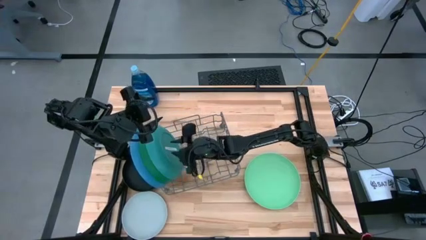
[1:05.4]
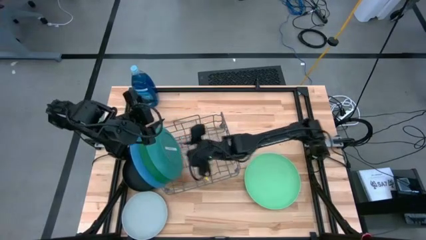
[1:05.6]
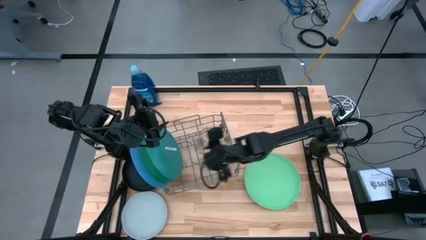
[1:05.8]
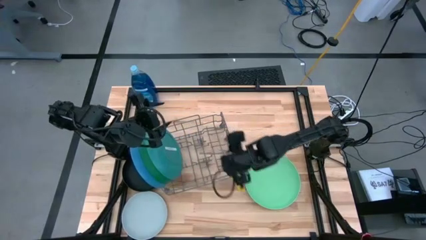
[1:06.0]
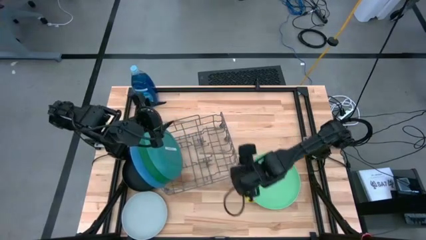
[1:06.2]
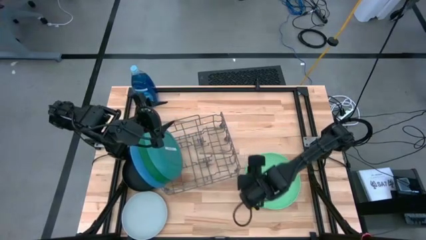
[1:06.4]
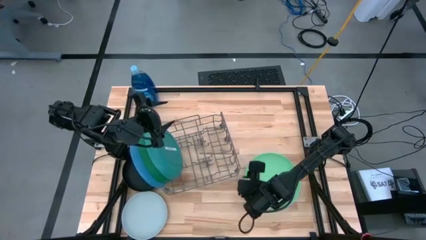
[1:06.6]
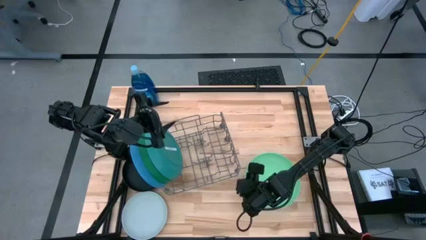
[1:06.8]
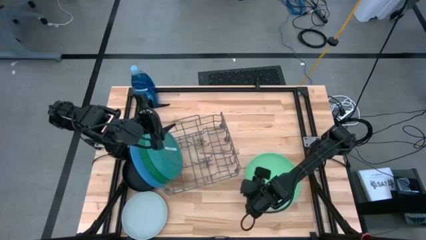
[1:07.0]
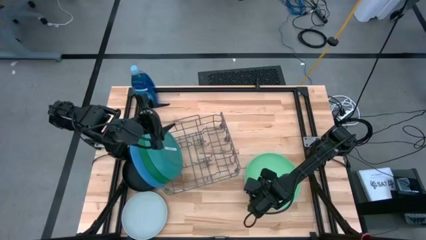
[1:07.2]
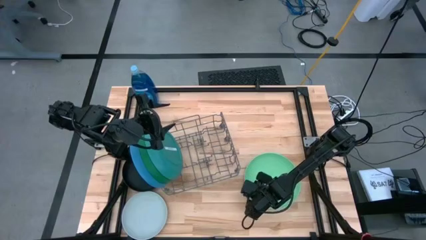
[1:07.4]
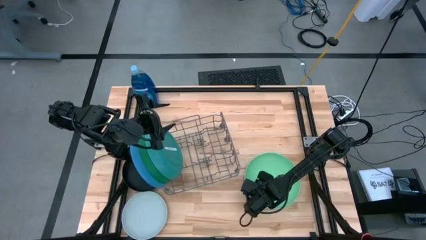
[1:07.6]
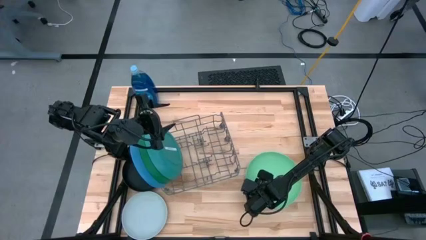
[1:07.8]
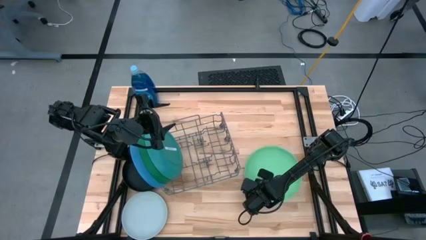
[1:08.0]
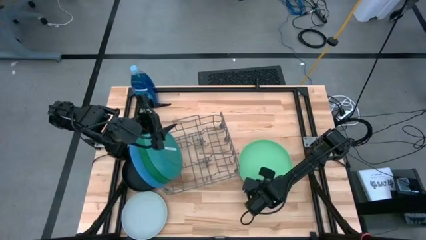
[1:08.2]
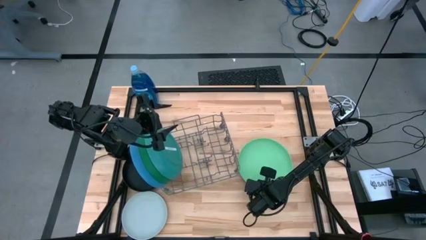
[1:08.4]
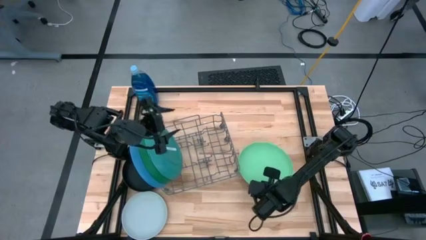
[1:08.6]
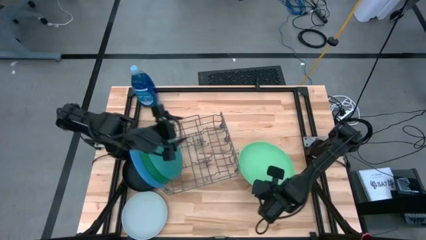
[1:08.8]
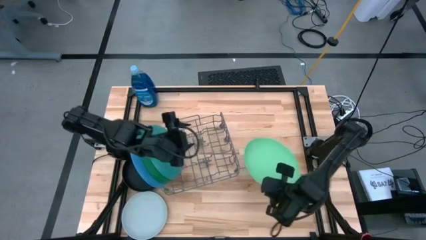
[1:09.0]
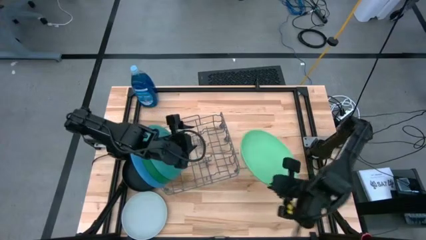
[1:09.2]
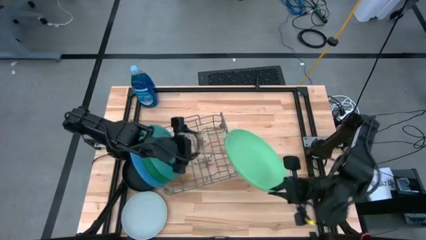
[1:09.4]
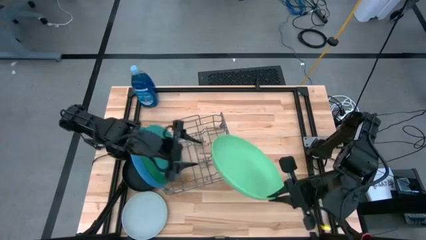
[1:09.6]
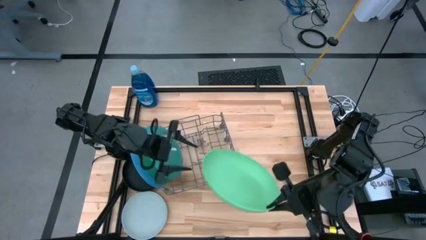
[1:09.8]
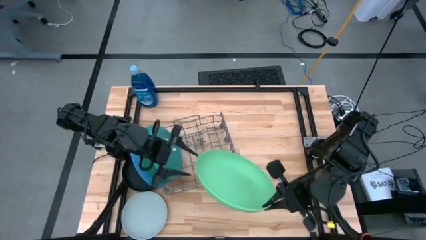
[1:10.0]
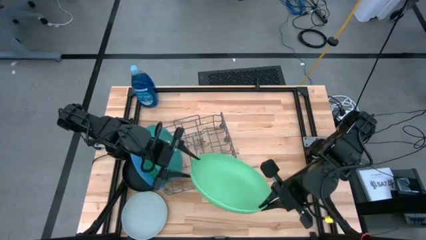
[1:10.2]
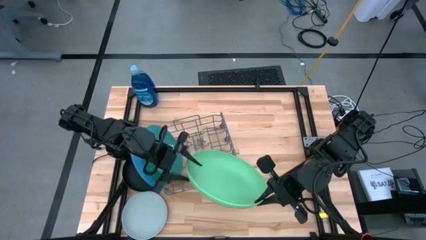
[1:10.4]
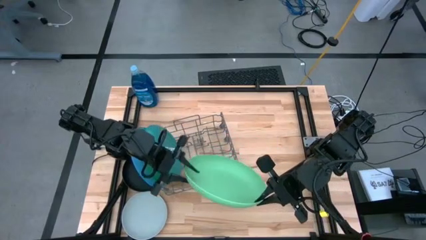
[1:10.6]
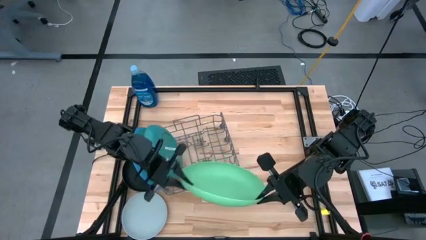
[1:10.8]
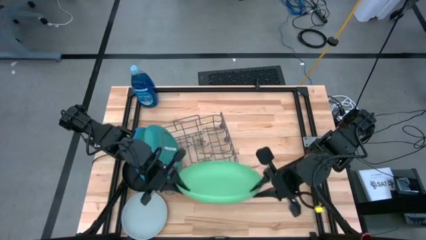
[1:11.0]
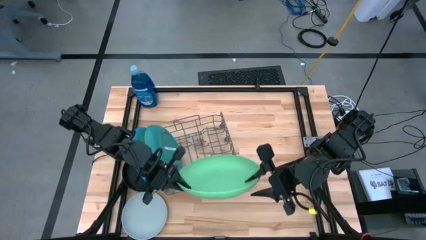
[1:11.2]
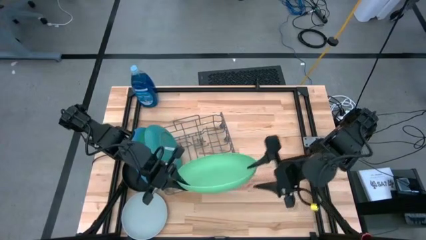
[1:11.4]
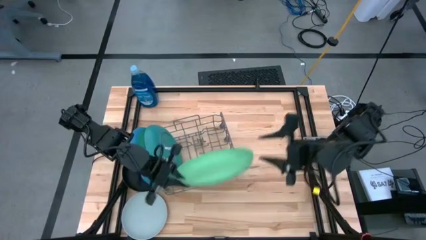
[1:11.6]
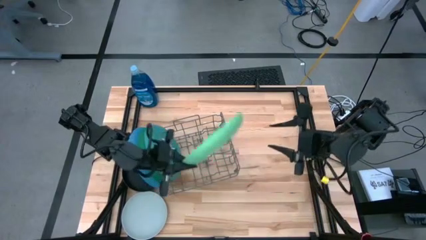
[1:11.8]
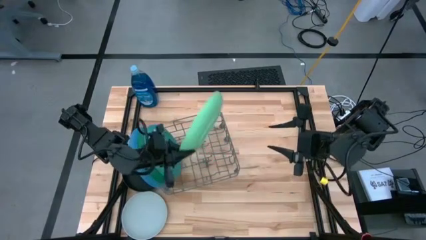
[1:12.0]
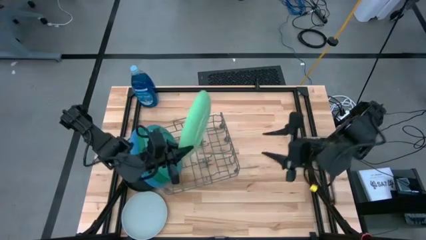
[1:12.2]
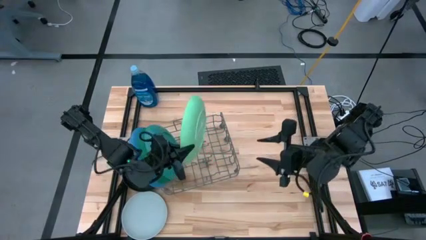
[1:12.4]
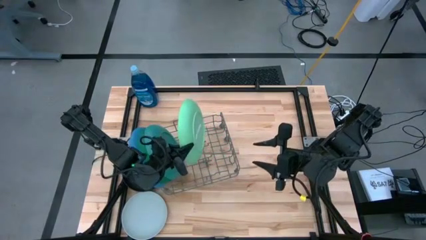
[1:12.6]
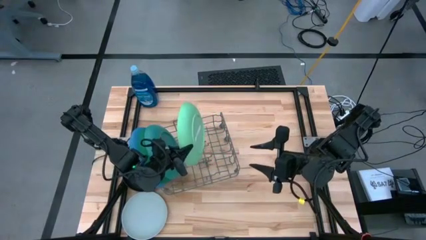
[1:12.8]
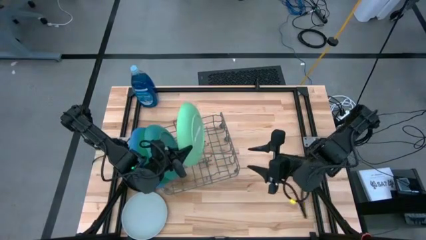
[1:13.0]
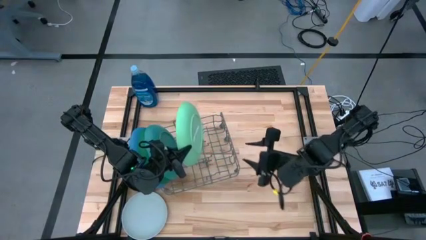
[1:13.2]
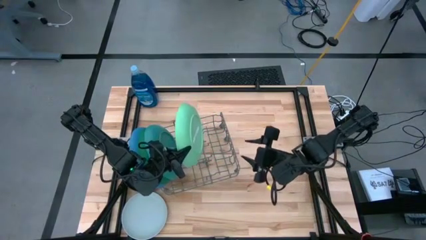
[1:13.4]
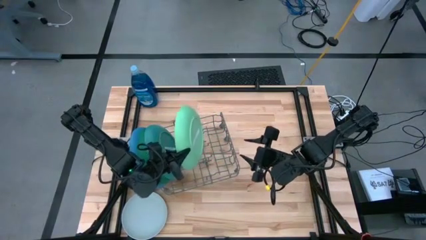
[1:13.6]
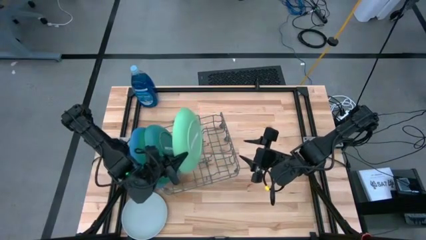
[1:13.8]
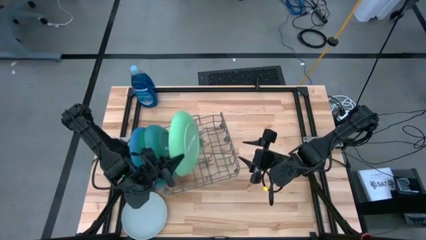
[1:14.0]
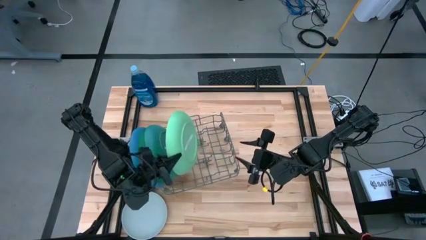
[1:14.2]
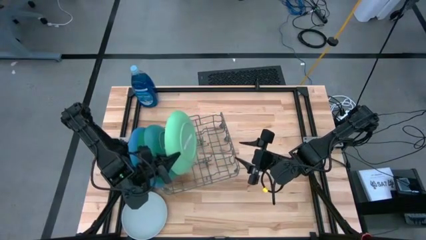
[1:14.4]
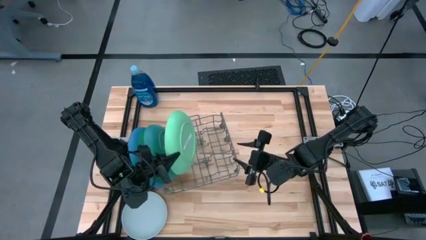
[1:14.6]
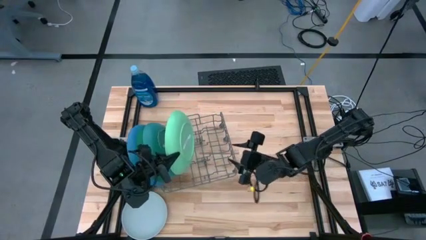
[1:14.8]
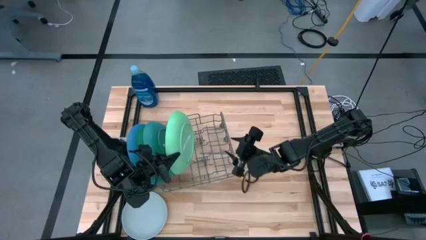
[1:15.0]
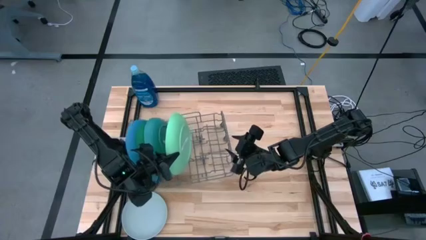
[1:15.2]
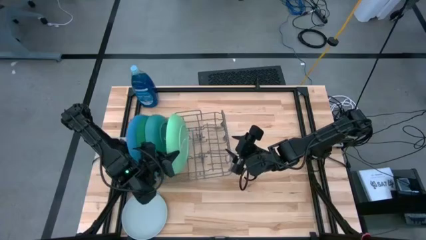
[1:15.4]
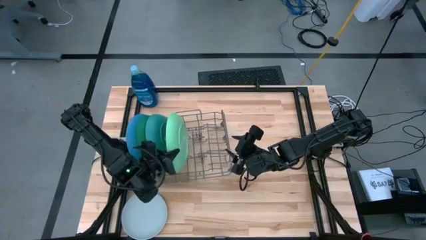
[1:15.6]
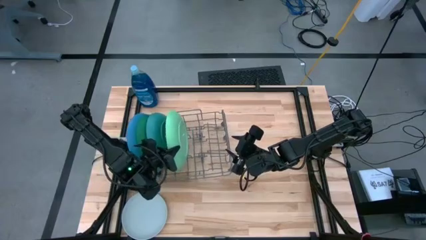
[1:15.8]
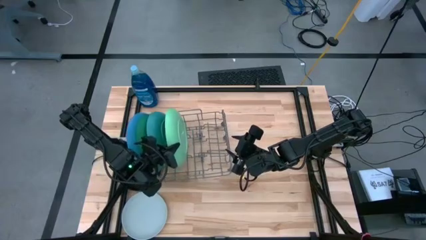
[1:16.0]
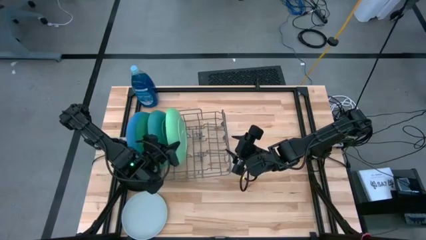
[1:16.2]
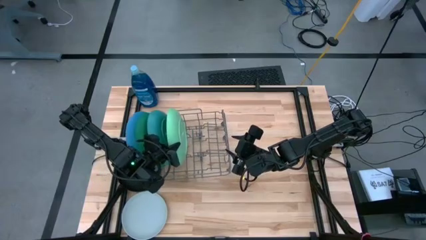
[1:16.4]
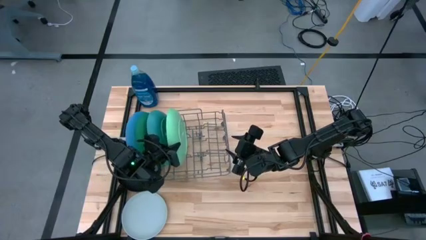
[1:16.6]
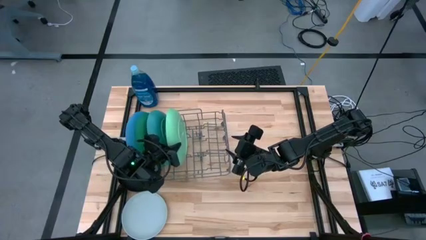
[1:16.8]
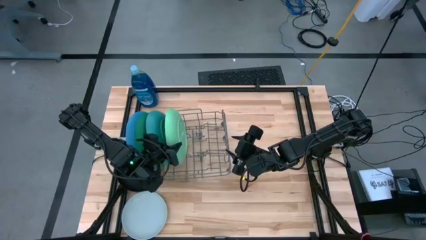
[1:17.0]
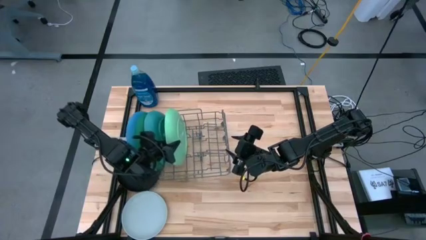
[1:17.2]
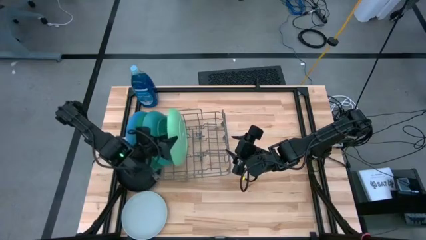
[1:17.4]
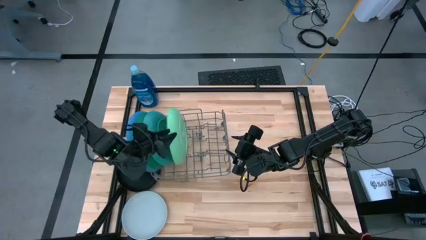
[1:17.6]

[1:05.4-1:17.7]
Task: Sort dishes
Put the light green plate into the gray dish rack
